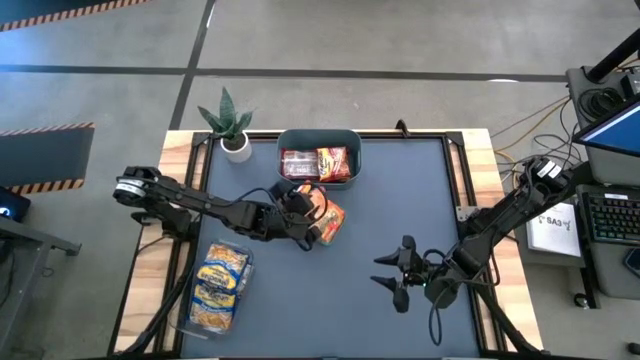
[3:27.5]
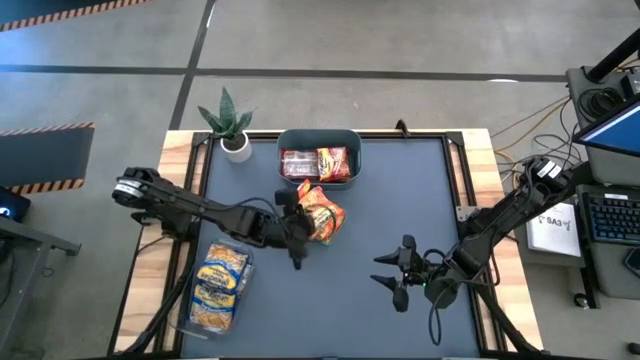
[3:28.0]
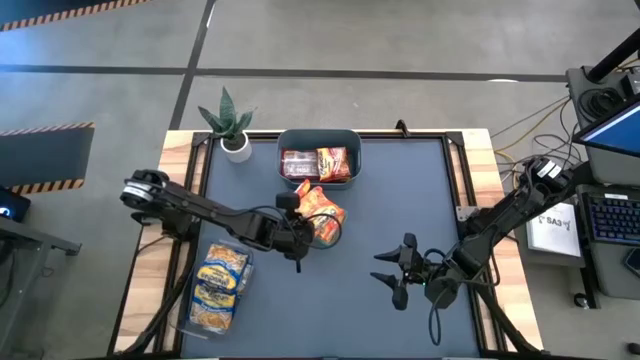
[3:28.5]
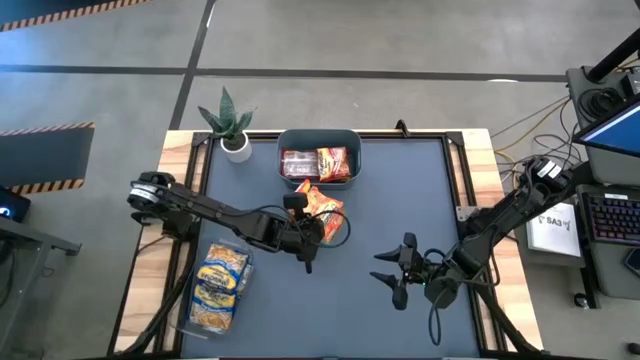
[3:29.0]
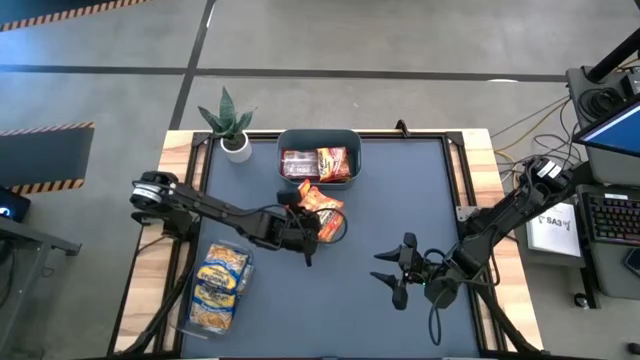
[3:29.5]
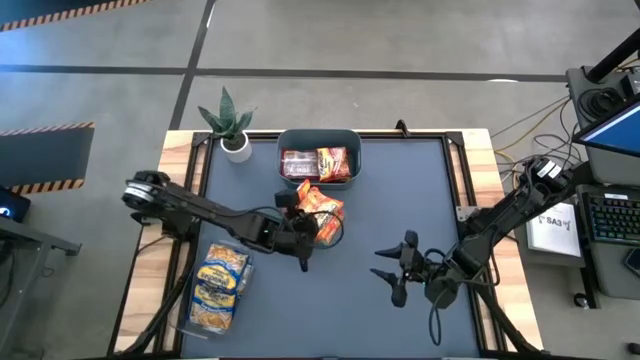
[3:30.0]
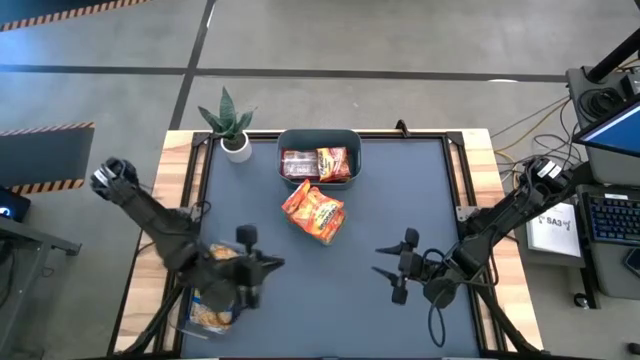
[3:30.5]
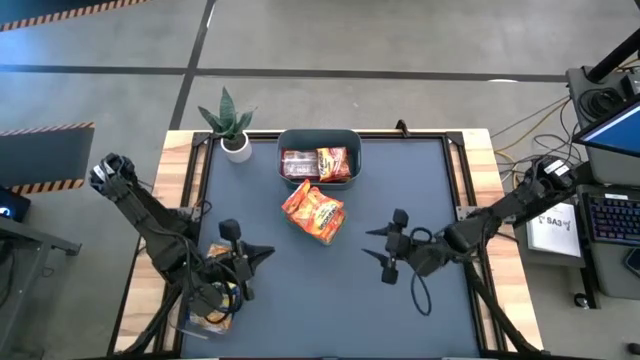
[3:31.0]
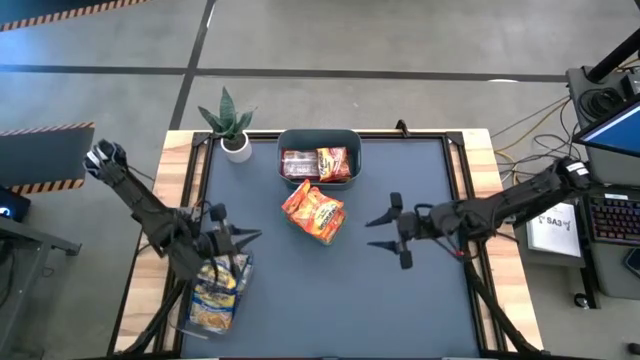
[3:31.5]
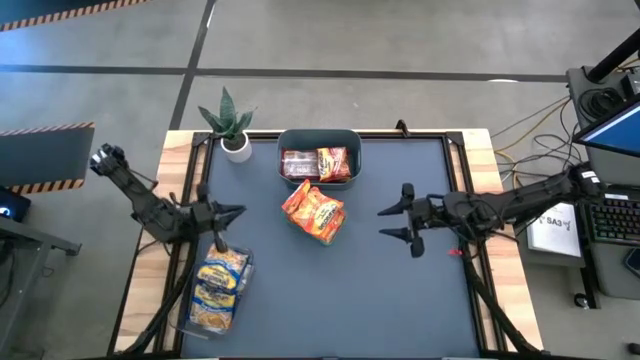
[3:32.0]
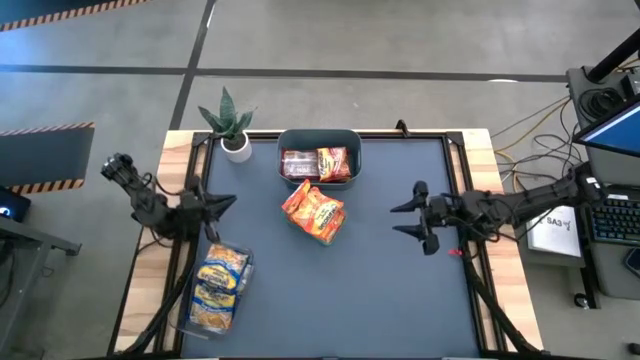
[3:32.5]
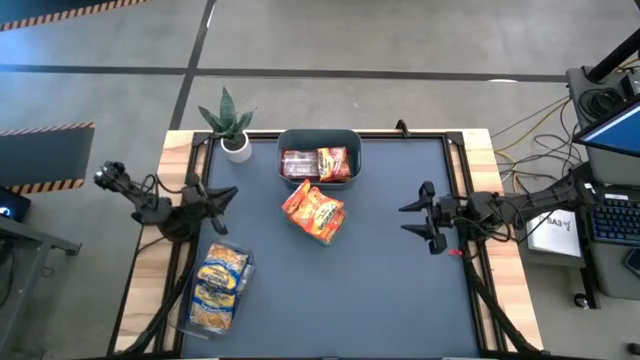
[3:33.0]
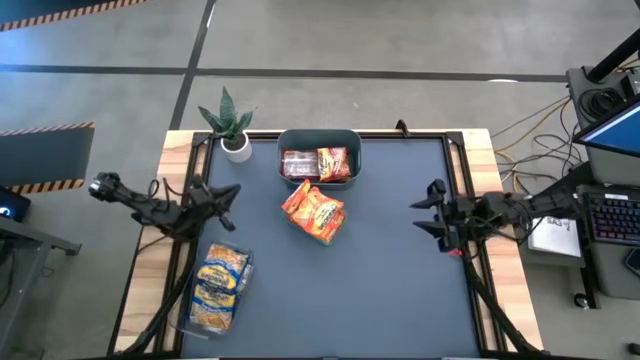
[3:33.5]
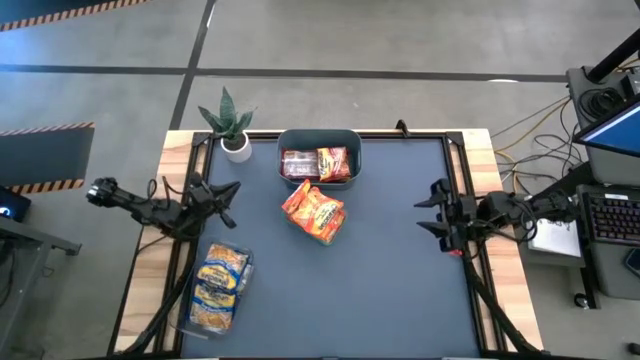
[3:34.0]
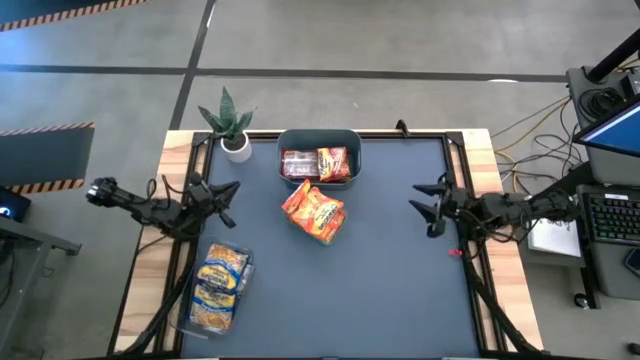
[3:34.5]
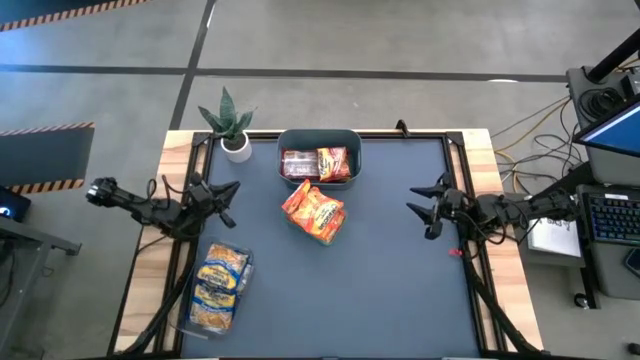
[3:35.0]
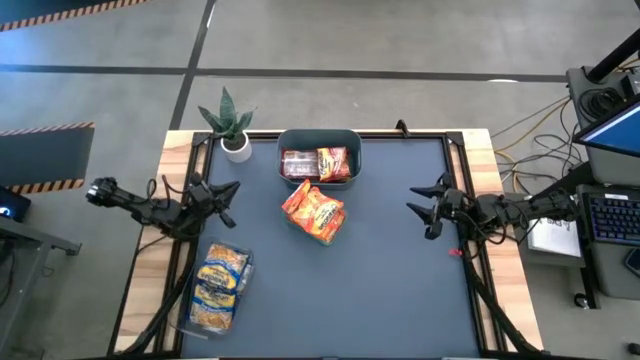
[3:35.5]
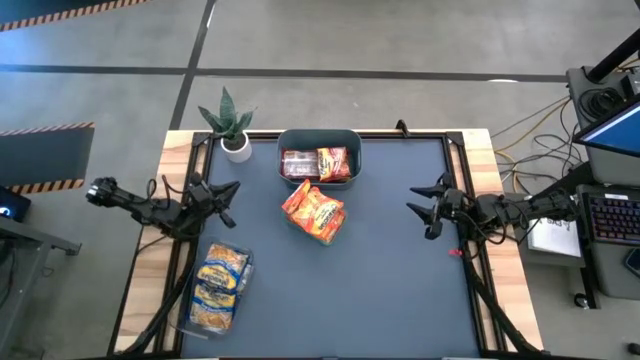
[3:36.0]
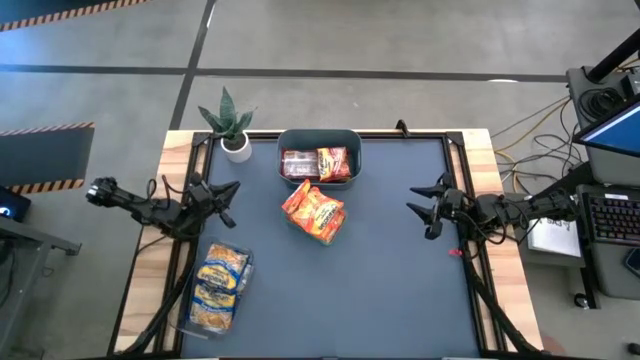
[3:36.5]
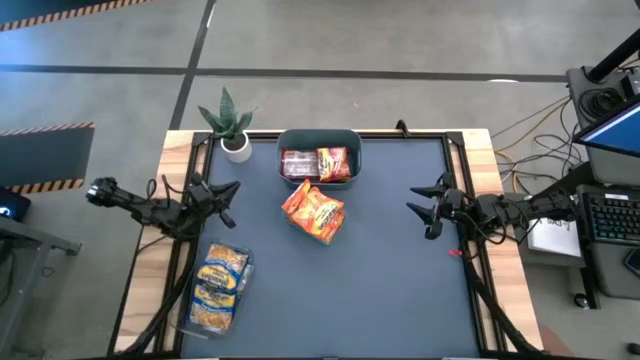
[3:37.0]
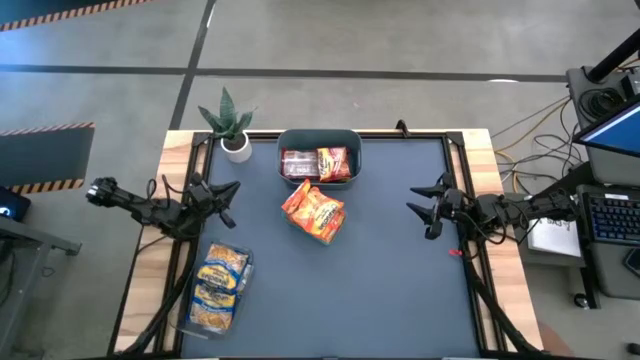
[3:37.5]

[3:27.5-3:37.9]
Task: Sort Maruchan noodles
Return to Home Position

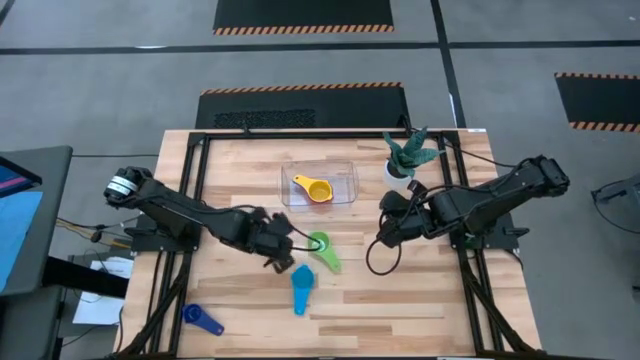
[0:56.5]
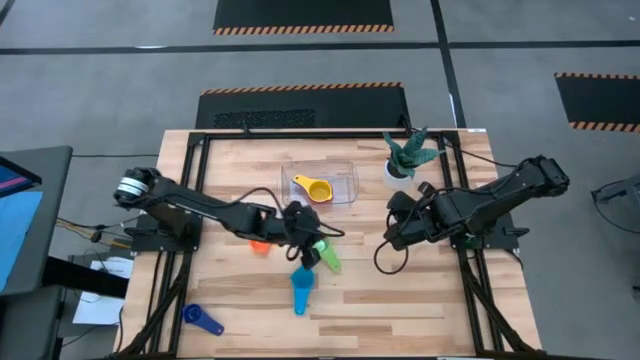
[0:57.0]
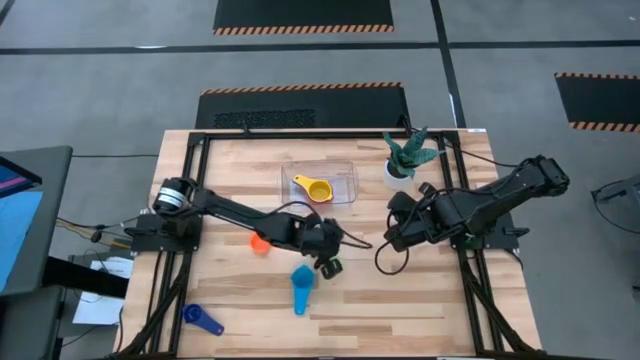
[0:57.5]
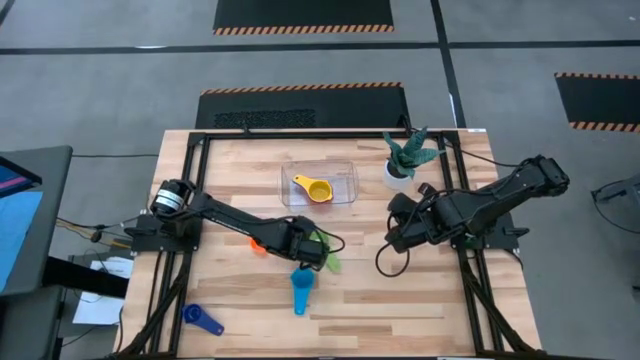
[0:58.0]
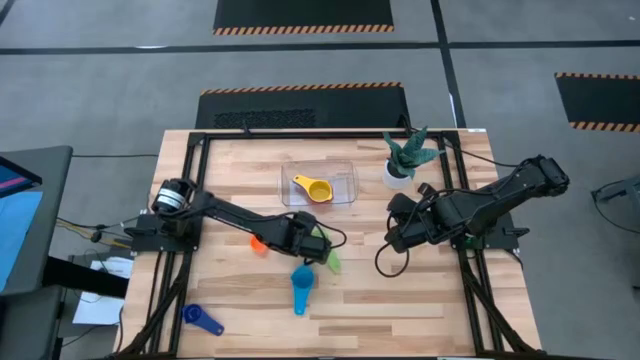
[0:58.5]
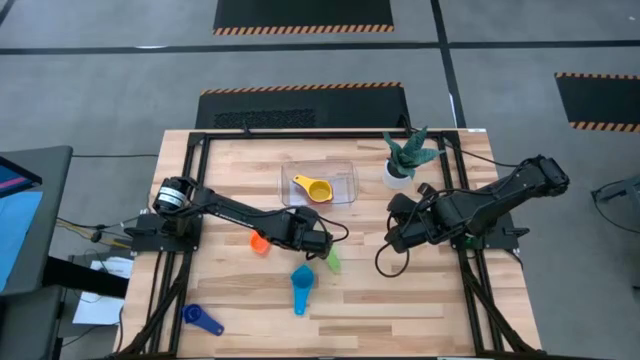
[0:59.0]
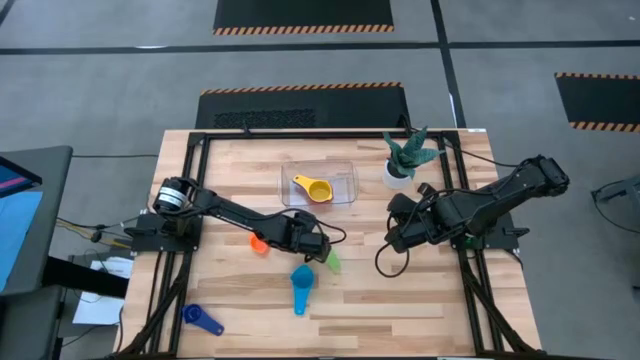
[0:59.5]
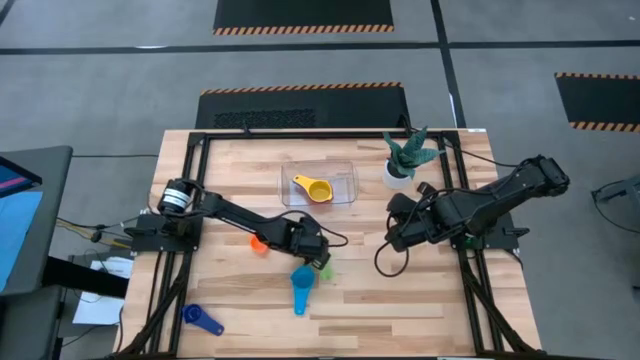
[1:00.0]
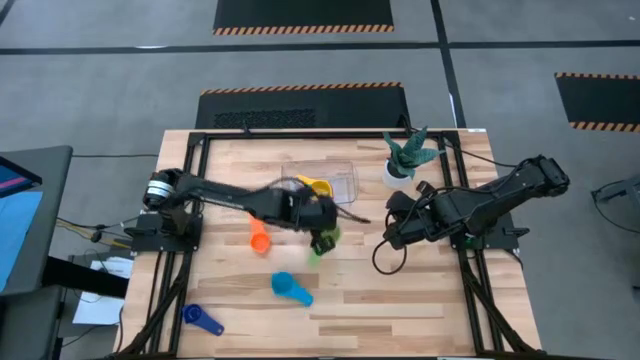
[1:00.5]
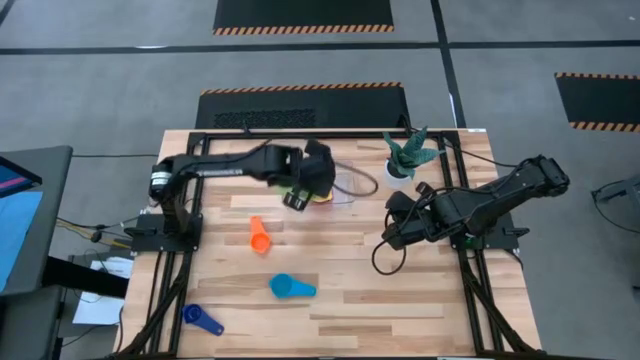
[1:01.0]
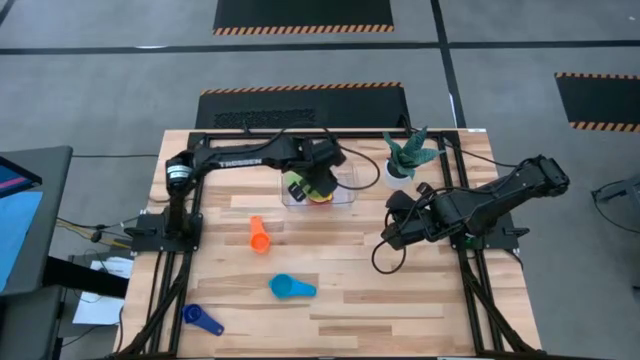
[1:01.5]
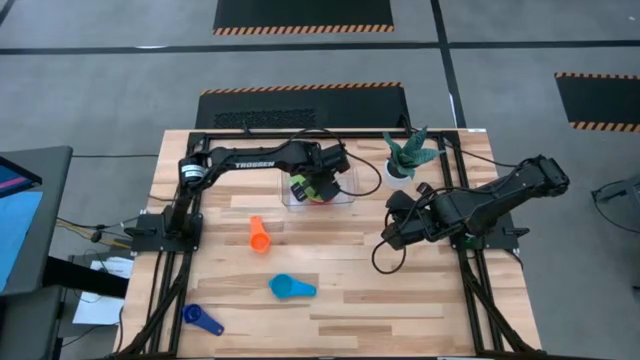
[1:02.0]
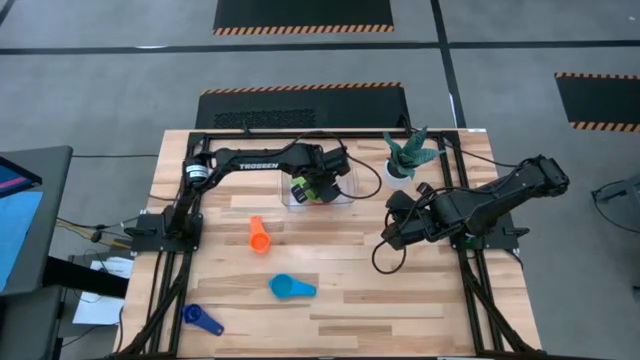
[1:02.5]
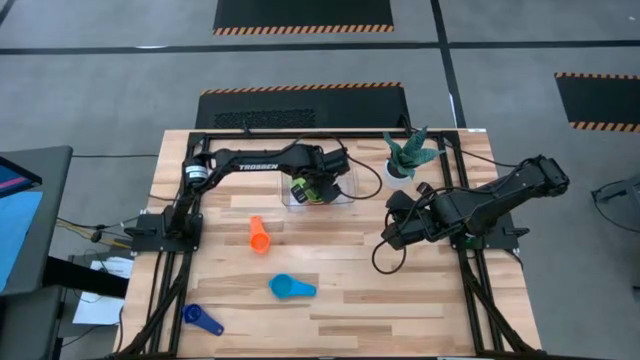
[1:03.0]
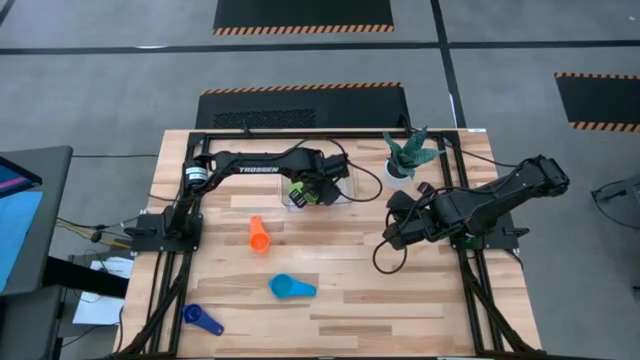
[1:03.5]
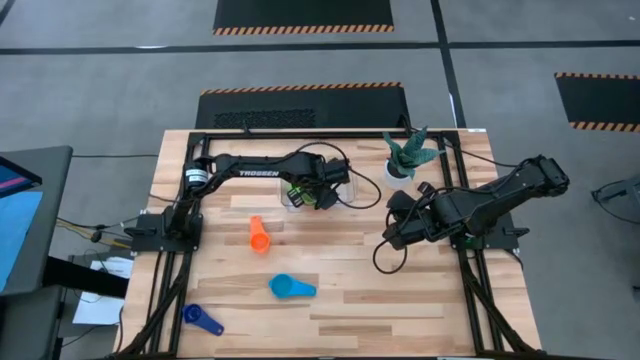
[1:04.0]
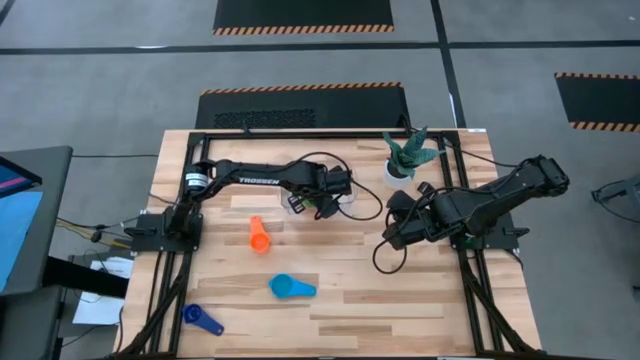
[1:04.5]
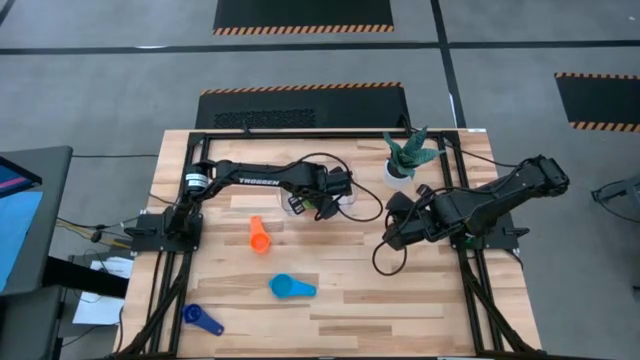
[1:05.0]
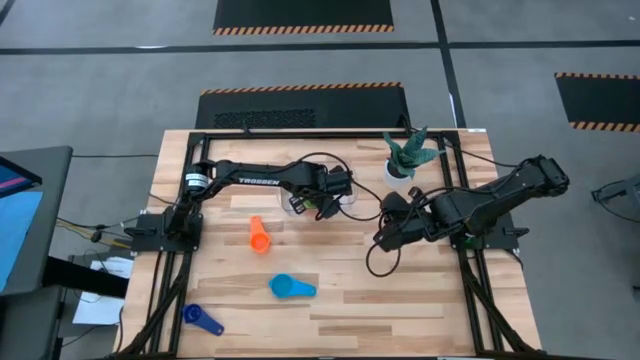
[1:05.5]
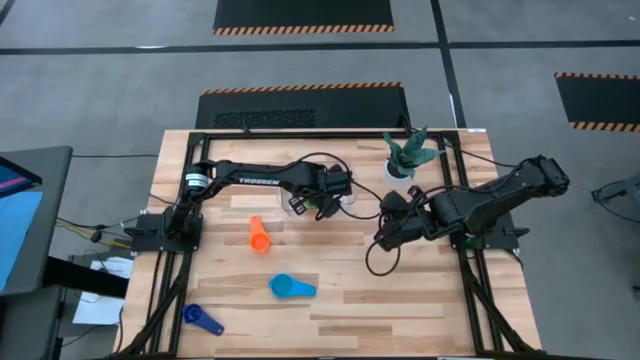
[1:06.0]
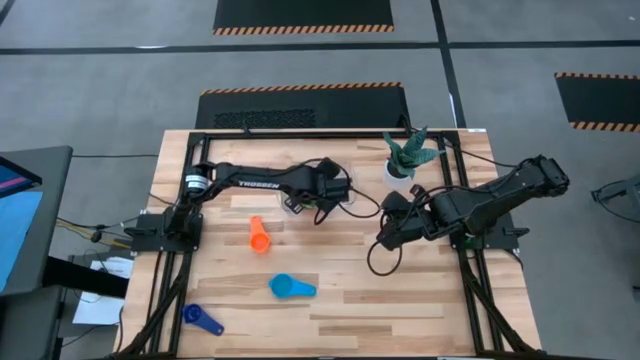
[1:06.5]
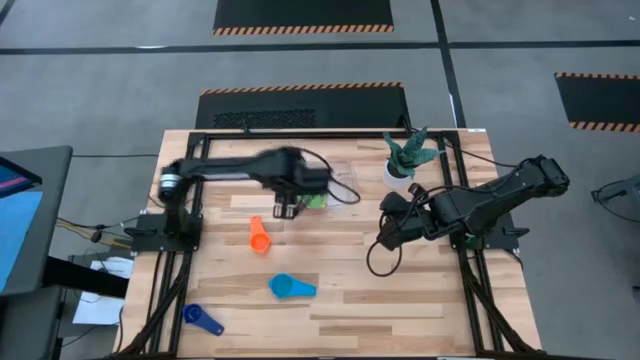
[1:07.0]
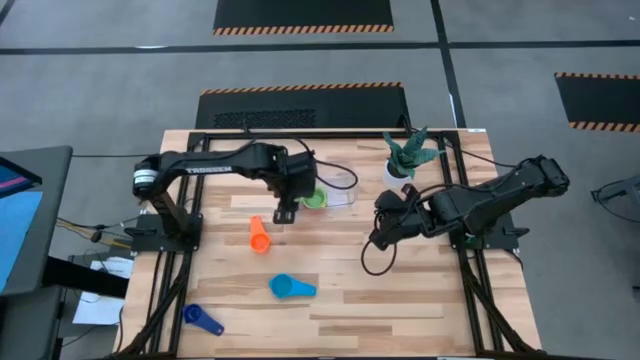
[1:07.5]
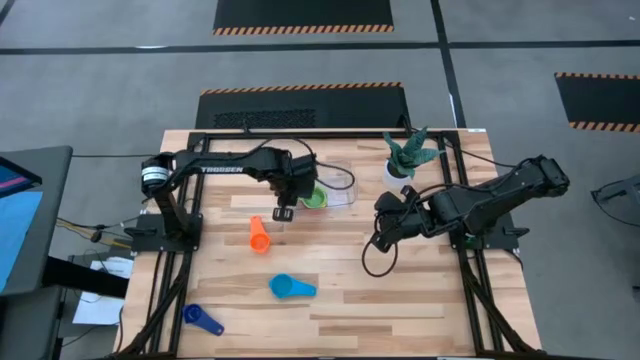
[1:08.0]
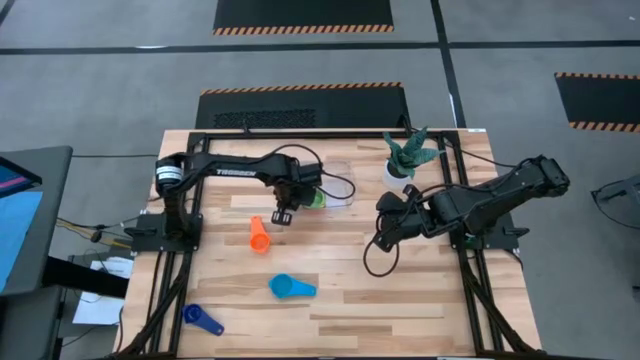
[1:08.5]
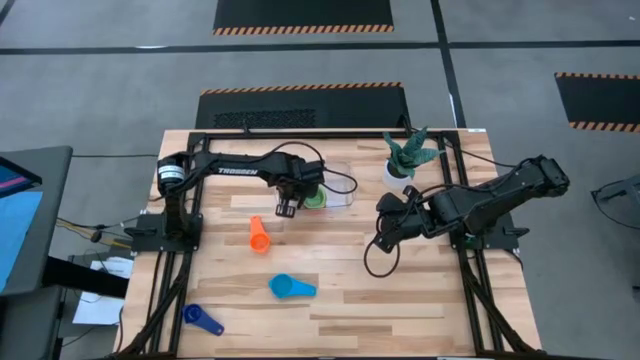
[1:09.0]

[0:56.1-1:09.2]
Task: Nest measuring cups in basket
Stack the green measuring cup on top of the yellow measuring cup in the transparent bin
